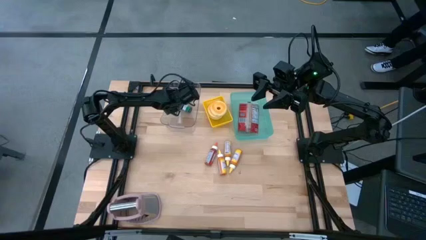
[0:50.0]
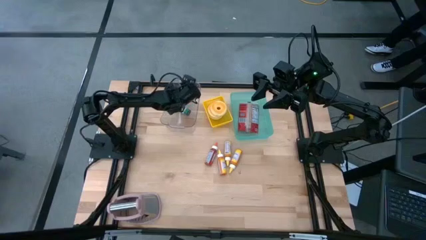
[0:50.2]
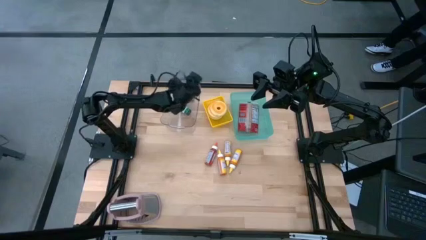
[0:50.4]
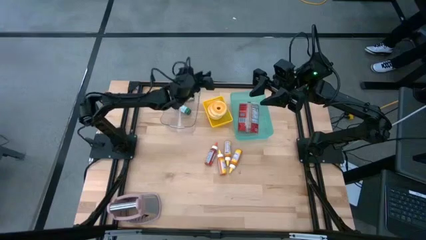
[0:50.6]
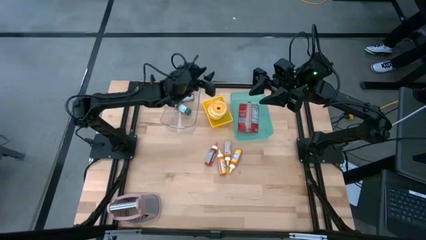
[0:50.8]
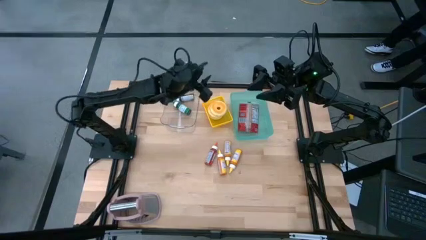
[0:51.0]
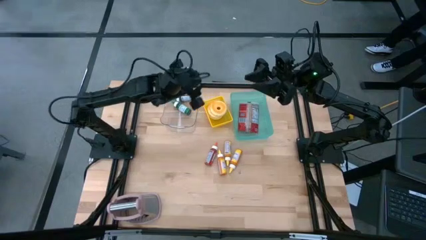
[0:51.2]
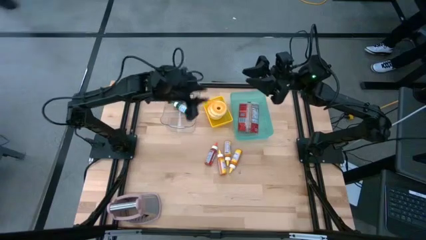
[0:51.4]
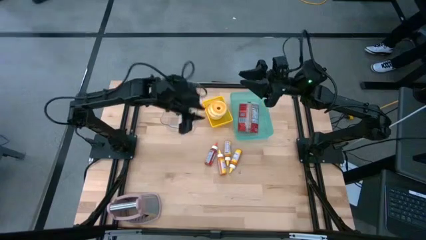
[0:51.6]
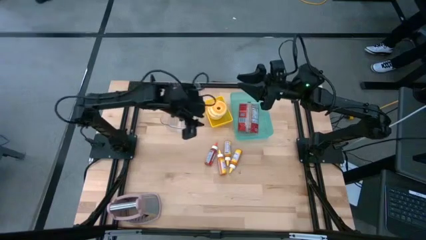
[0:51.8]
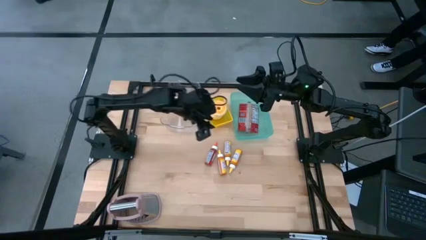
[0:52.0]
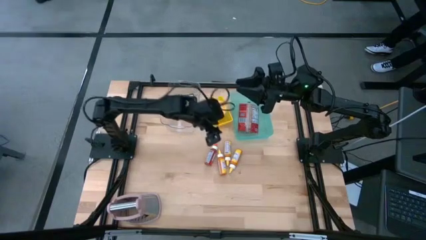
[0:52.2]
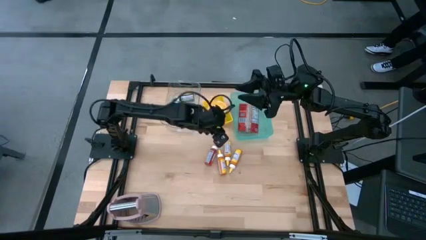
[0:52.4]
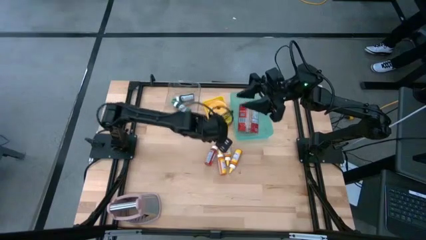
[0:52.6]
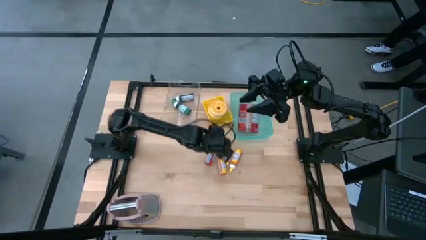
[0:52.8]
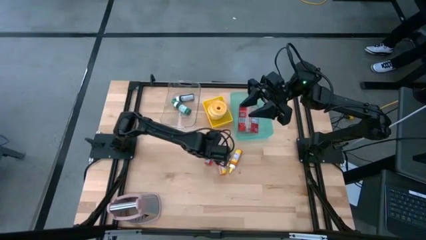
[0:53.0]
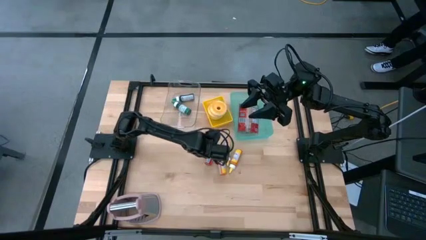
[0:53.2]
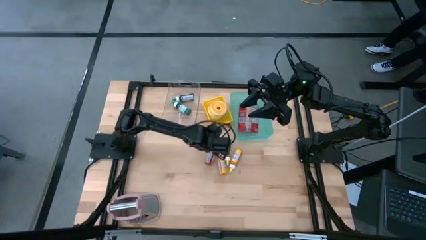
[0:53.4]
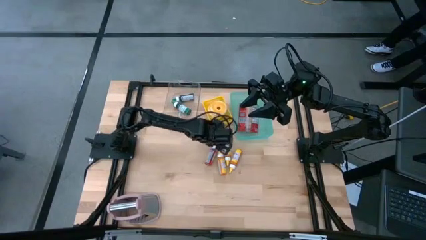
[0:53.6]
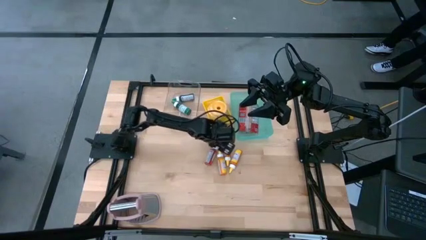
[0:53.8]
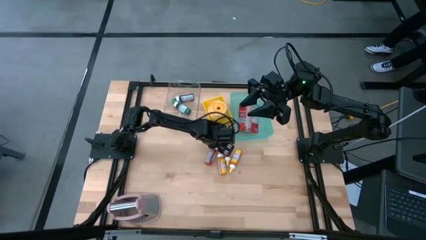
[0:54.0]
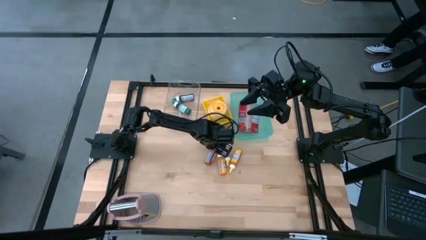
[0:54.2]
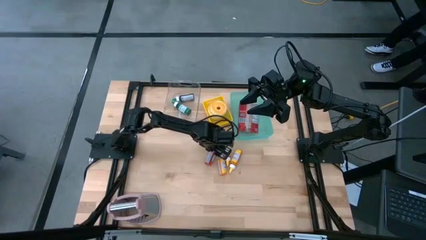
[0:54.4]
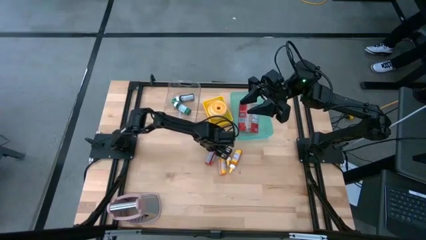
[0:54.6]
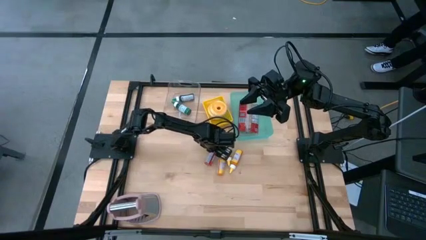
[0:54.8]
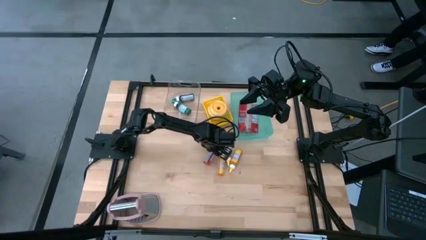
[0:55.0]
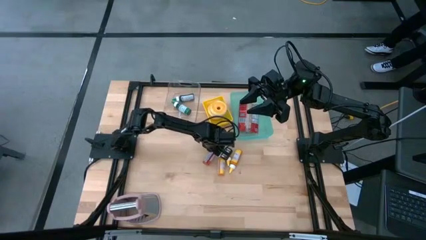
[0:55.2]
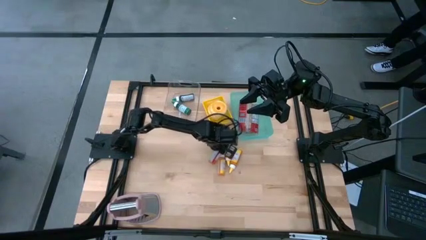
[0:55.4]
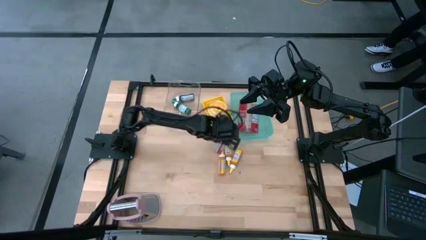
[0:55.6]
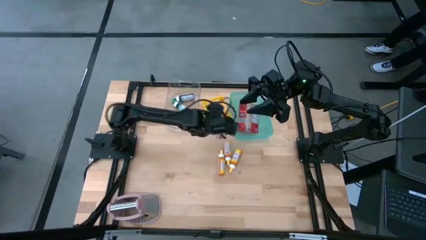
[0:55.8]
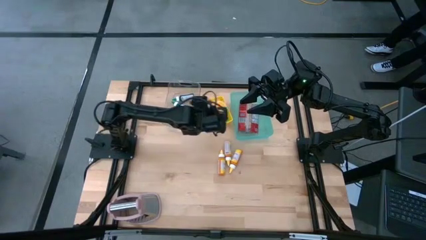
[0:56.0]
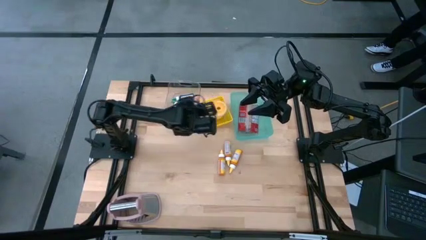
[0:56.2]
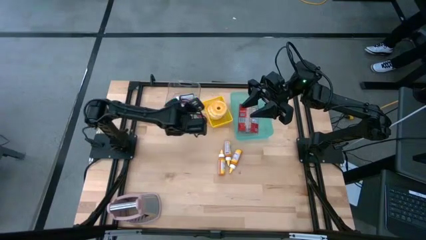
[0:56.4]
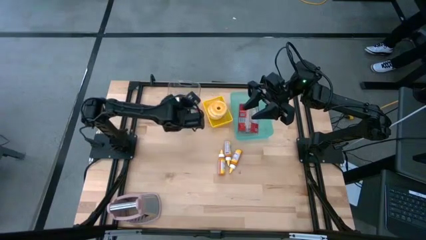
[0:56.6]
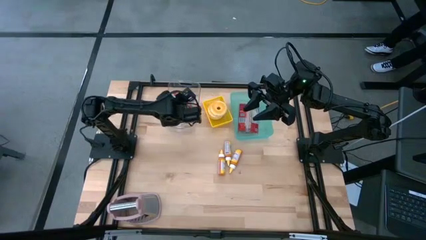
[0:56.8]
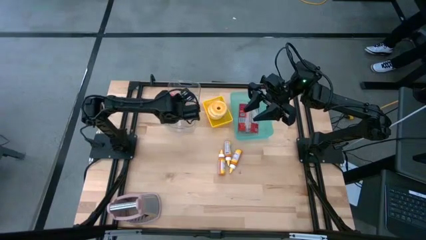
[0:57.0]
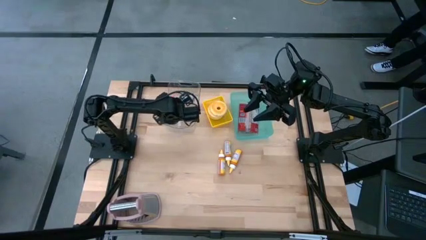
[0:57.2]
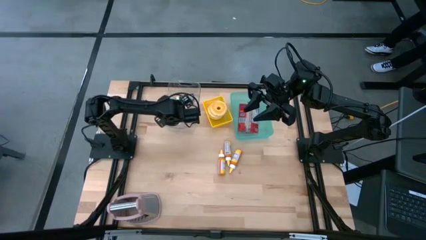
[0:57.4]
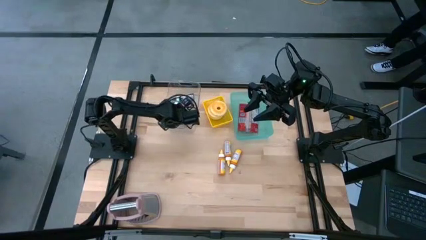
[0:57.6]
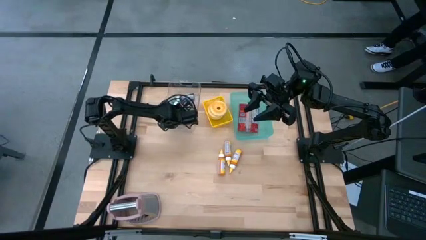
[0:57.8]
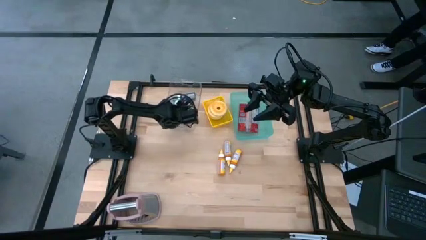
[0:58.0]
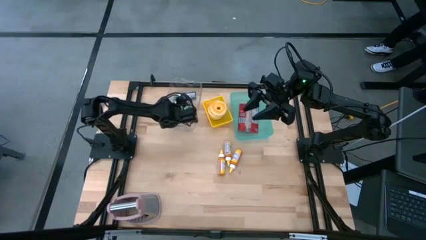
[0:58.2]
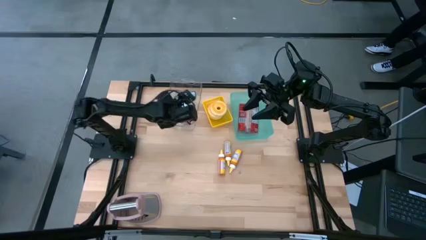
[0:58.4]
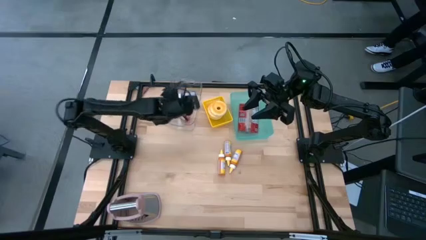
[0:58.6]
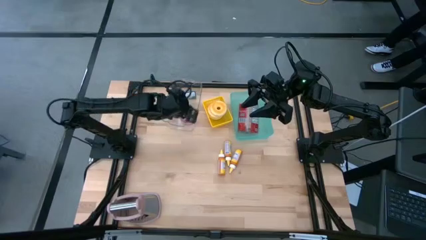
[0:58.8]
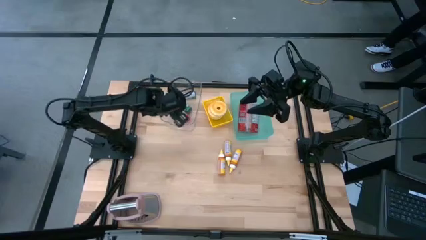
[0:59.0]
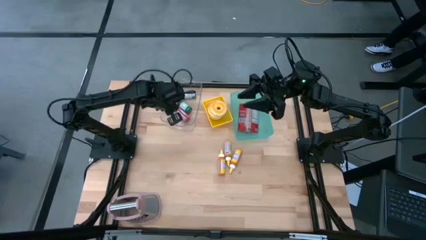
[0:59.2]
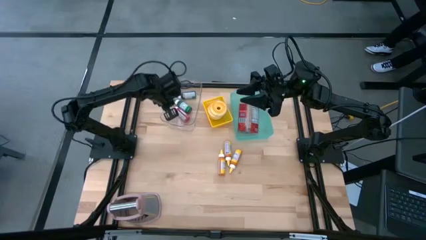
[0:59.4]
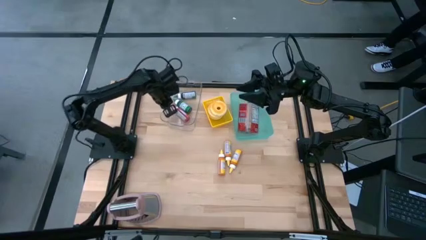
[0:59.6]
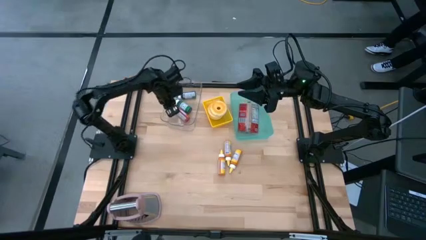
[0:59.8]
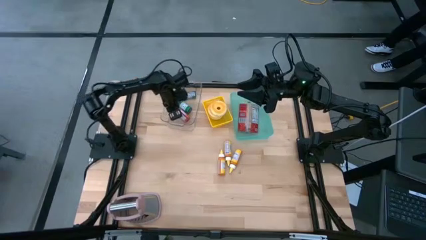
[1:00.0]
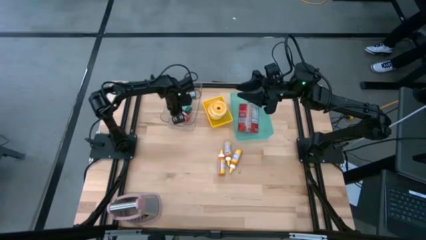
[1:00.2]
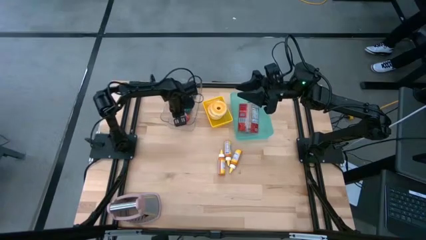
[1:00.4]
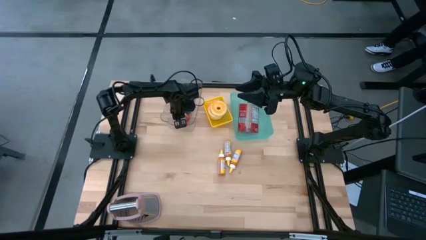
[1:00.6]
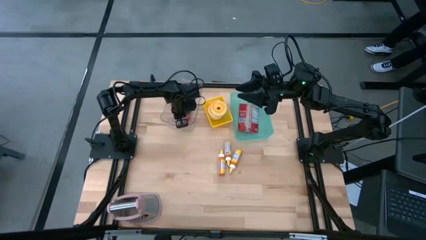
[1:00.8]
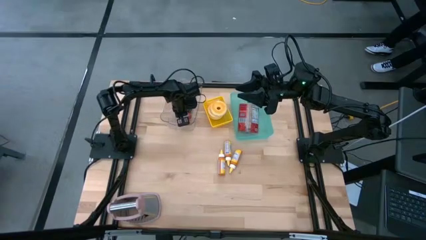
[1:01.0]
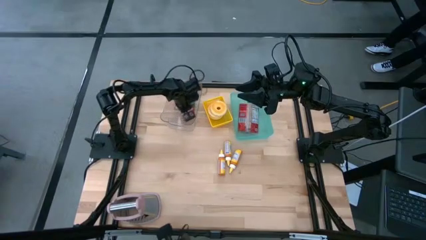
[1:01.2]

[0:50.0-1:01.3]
Put the orange food coloring bottle into the transparent bin
